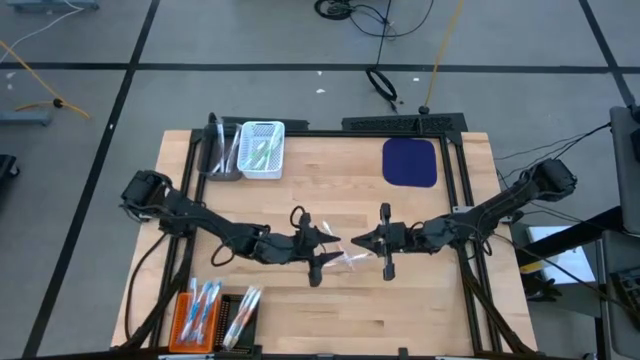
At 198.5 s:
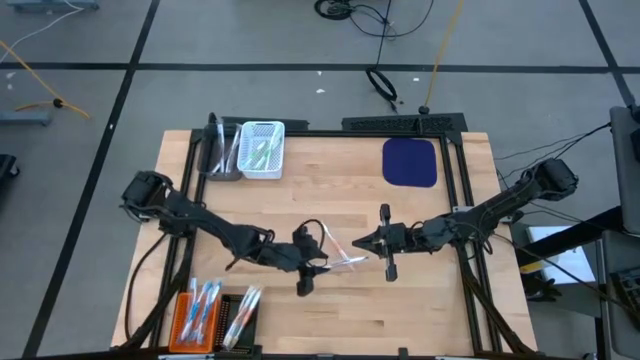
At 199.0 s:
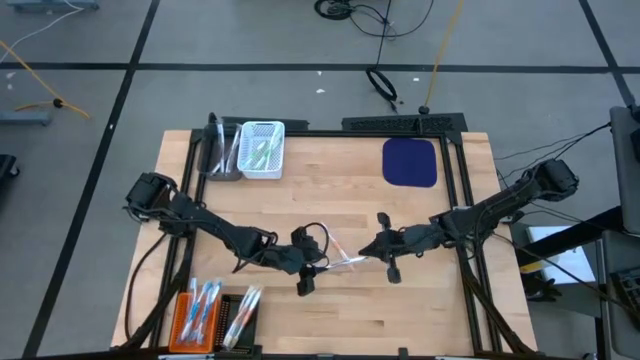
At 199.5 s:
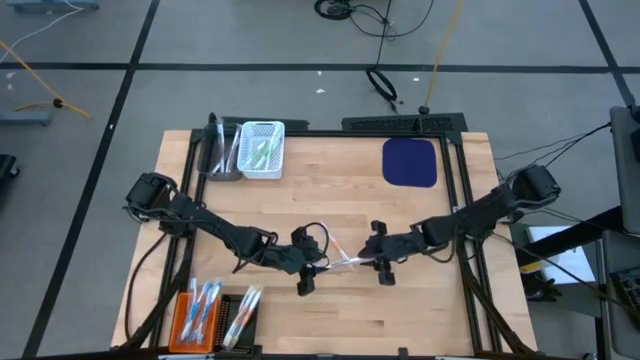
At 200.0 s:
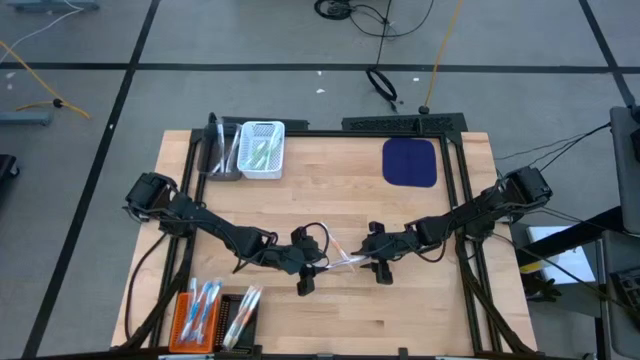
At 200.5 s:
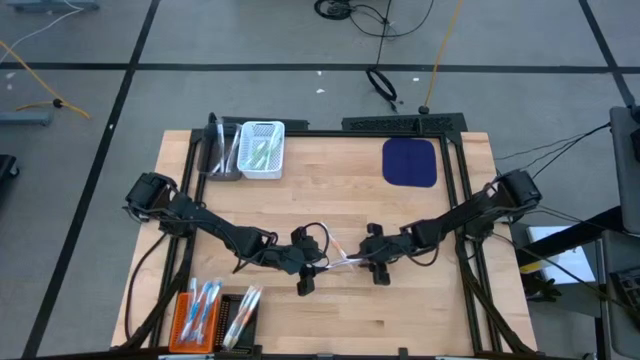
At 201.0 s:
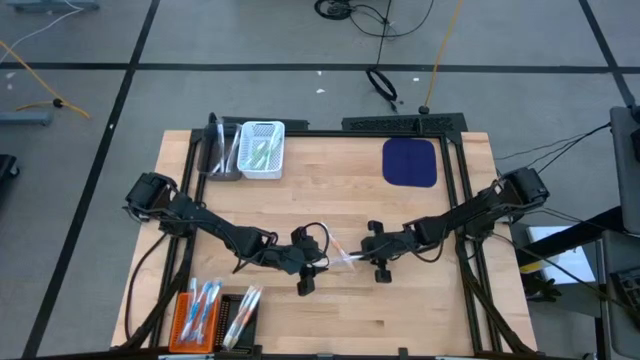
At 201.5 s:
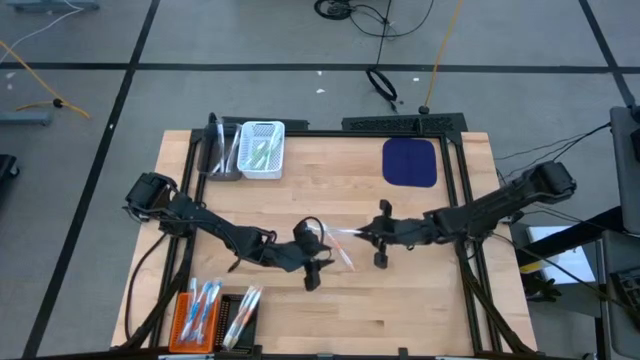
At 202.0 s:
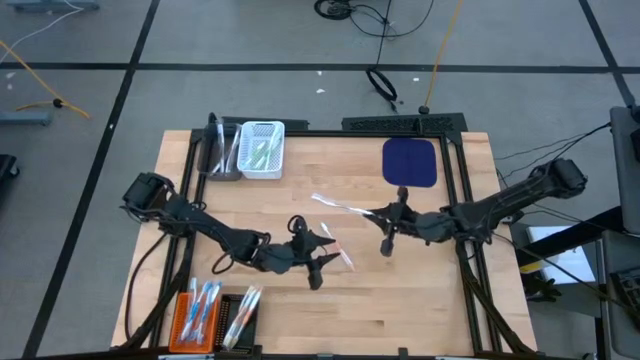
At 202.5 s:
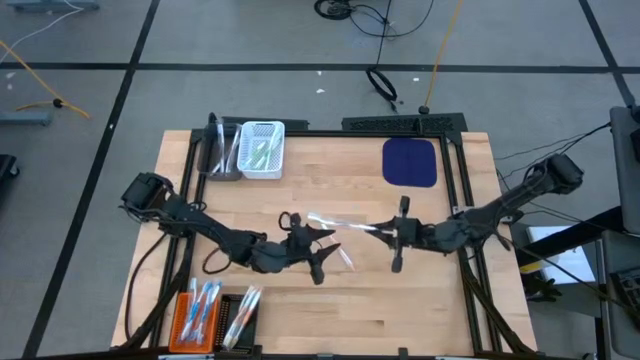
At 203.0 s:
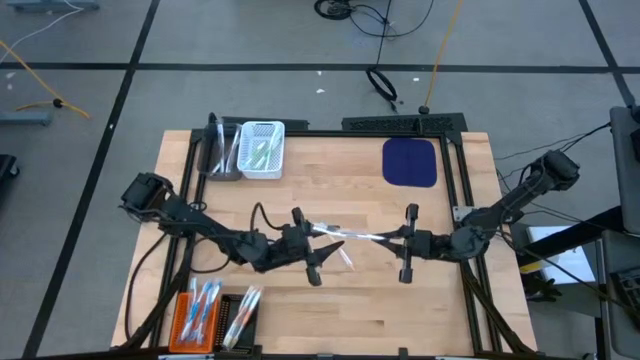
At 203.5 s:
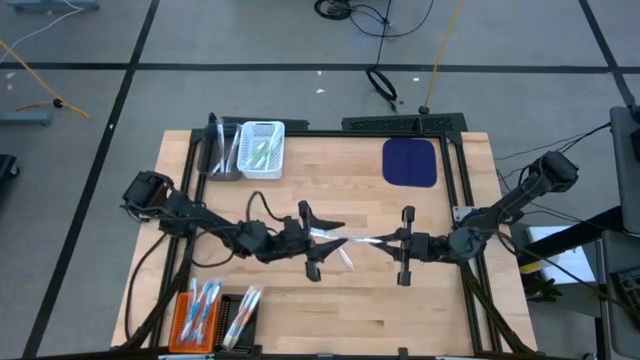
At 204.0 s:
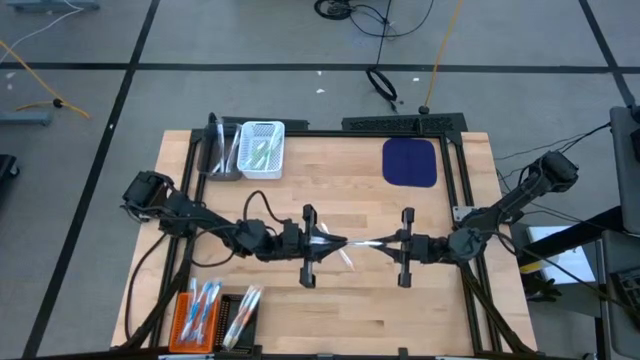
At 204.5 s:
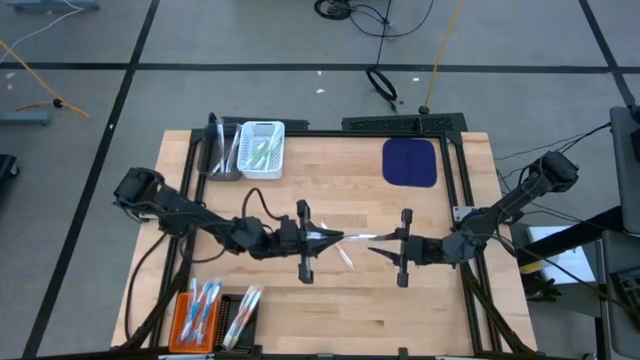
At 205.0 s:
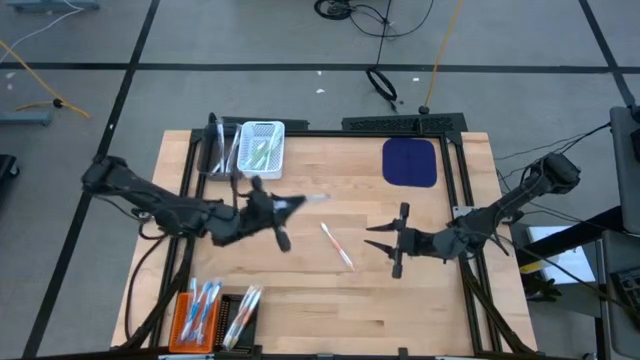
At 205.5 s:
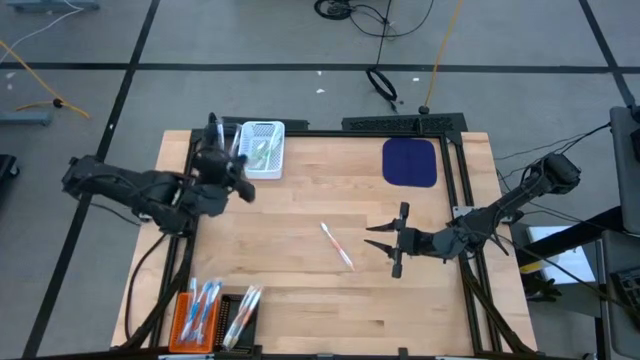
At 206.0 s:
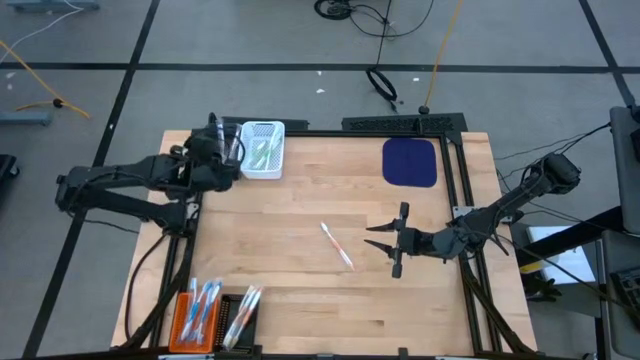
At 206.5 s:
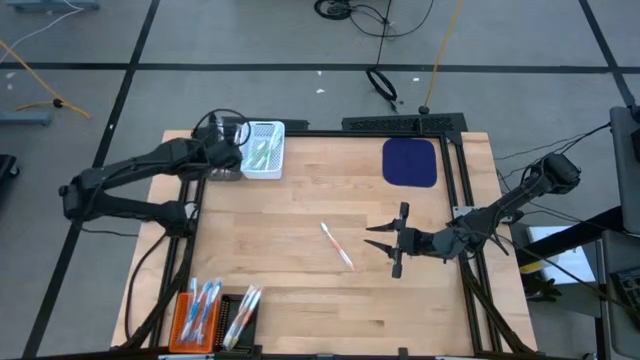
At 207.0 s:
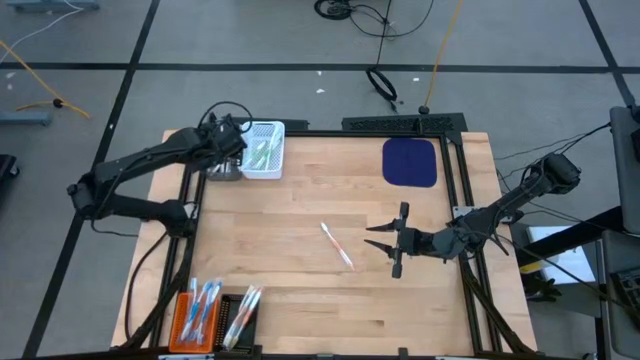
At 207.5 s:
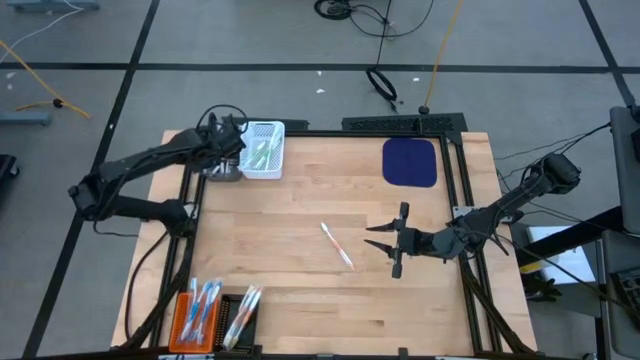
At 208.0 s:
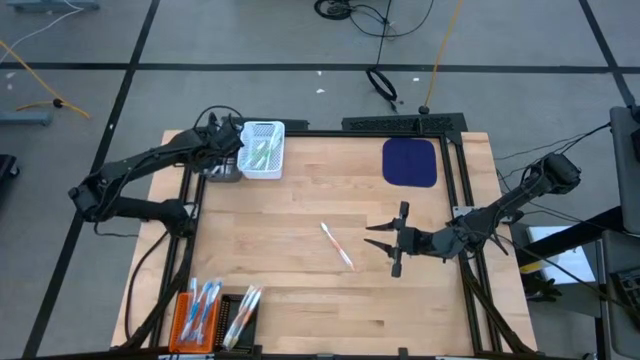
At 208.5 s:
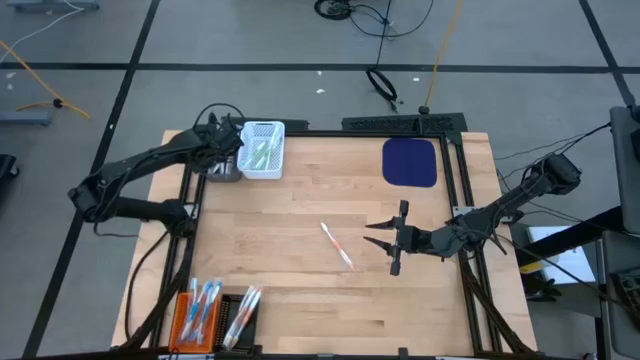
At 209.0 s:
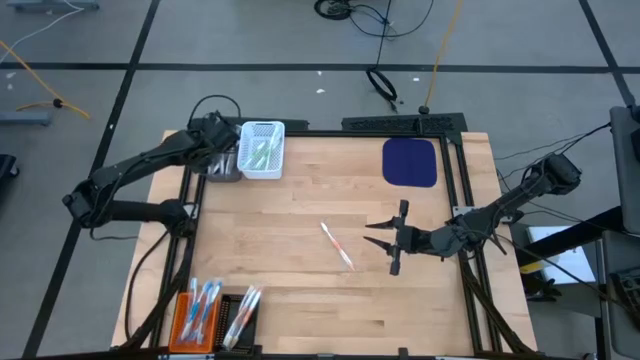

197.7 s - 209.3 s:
Task: Pick & Place Toothbrushes
Put the violet toothbrush into the gray bin

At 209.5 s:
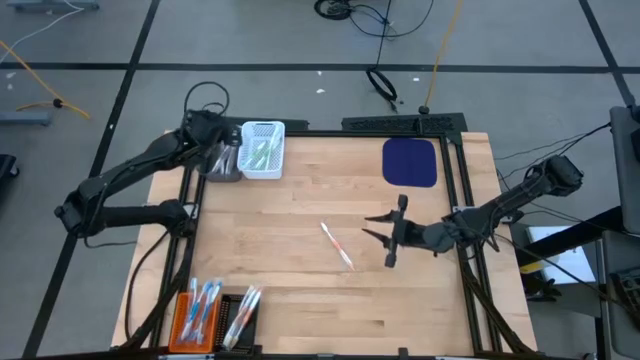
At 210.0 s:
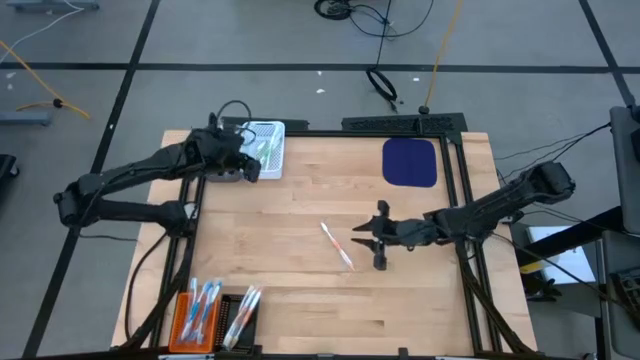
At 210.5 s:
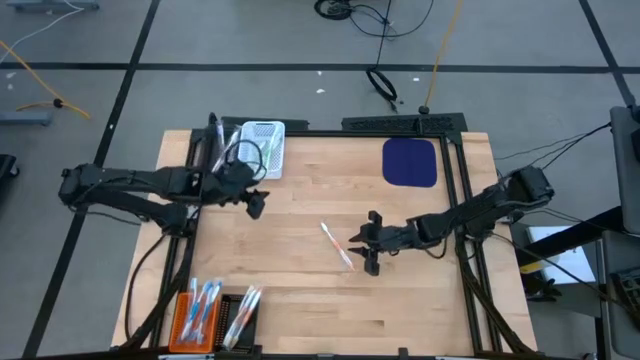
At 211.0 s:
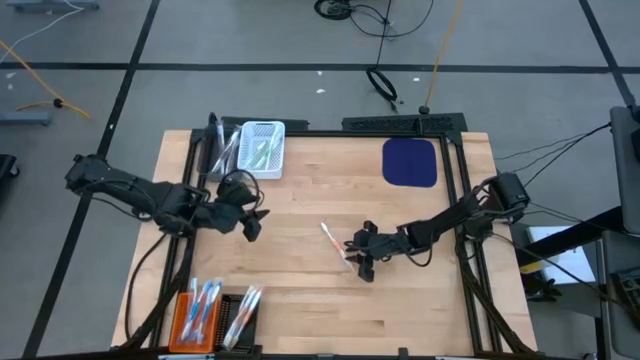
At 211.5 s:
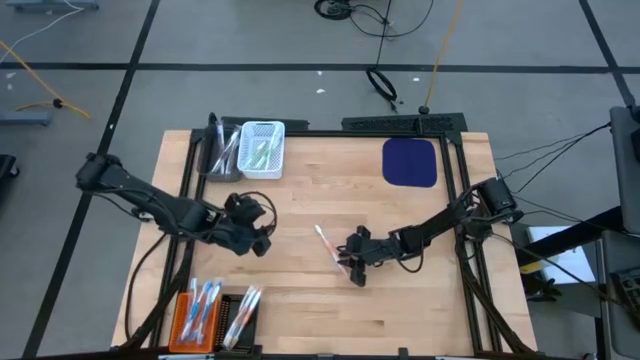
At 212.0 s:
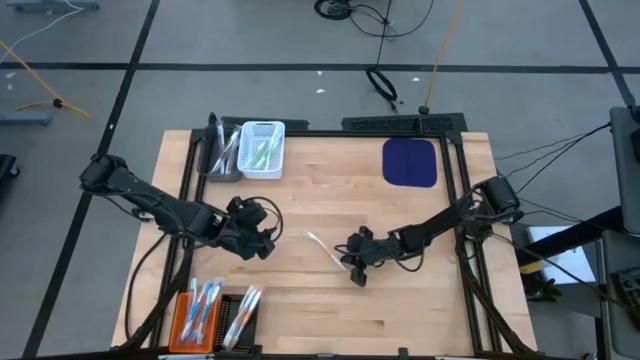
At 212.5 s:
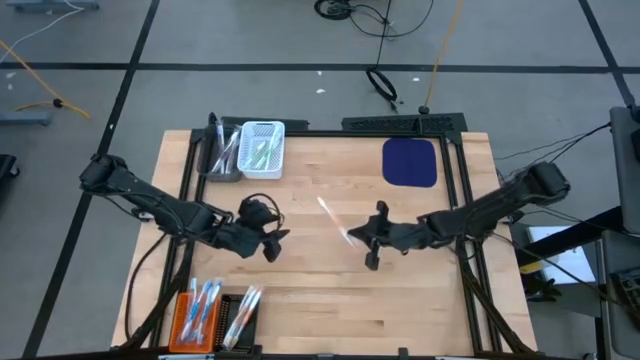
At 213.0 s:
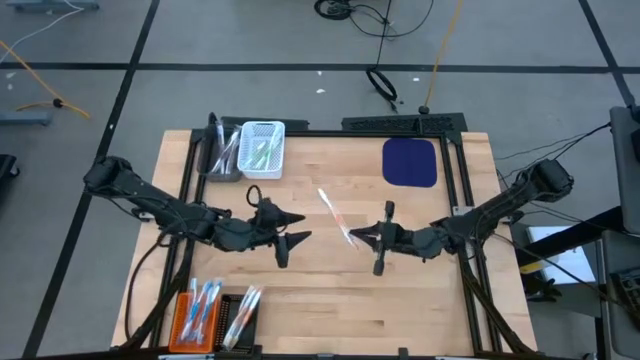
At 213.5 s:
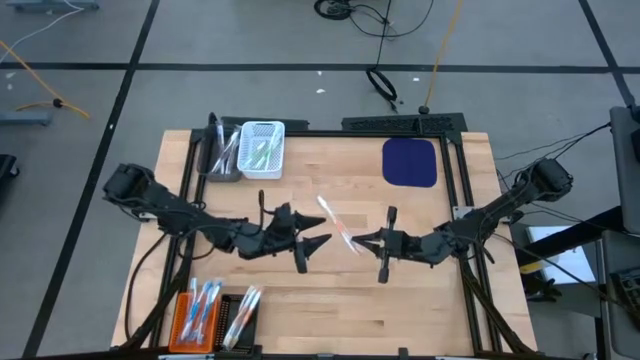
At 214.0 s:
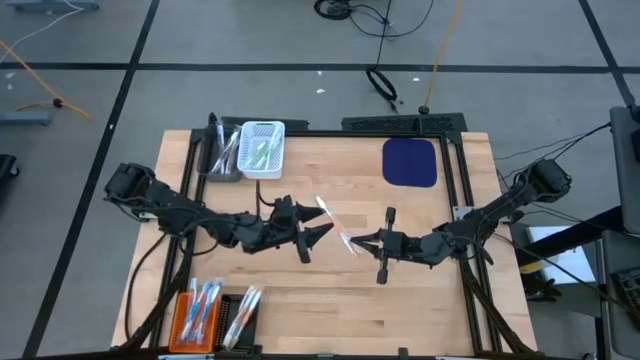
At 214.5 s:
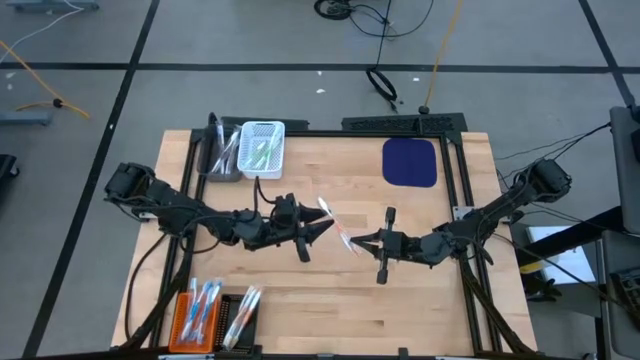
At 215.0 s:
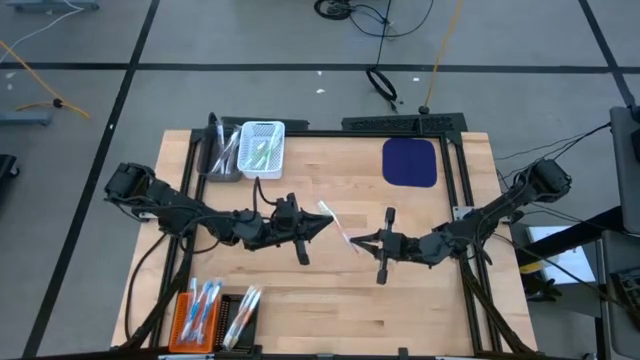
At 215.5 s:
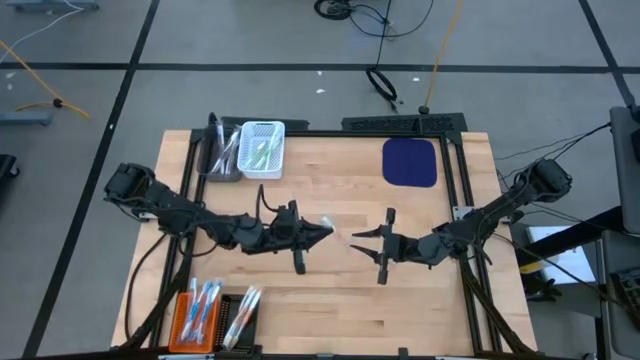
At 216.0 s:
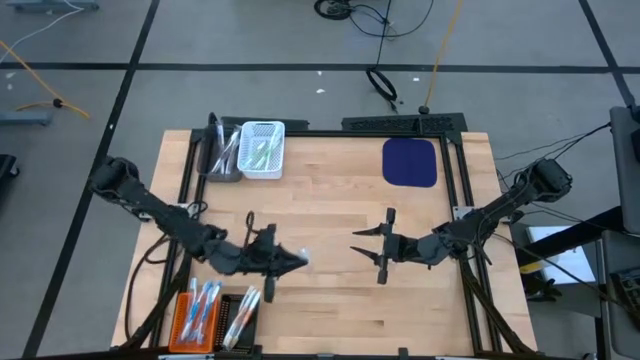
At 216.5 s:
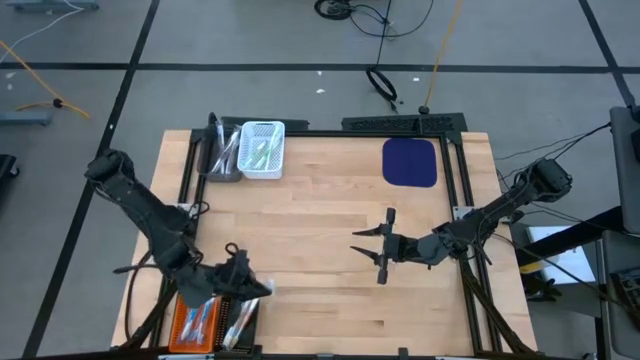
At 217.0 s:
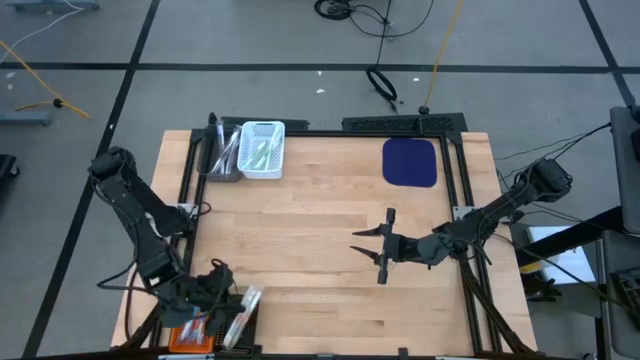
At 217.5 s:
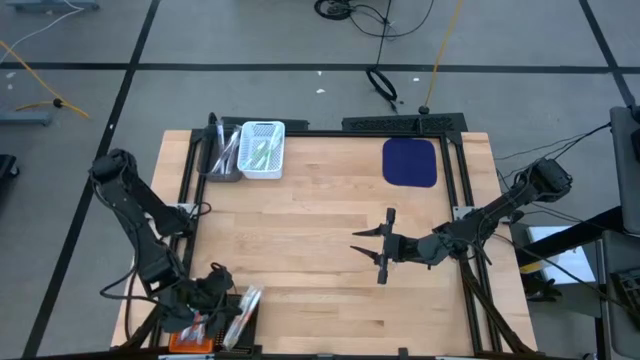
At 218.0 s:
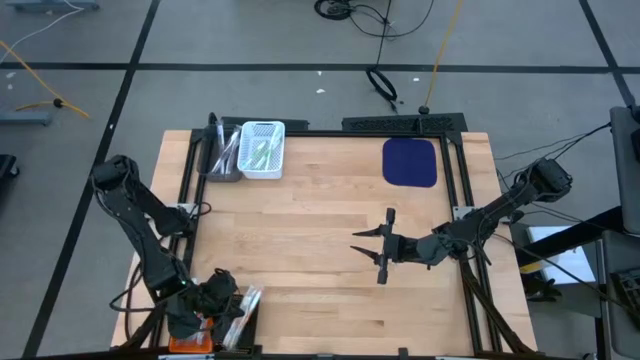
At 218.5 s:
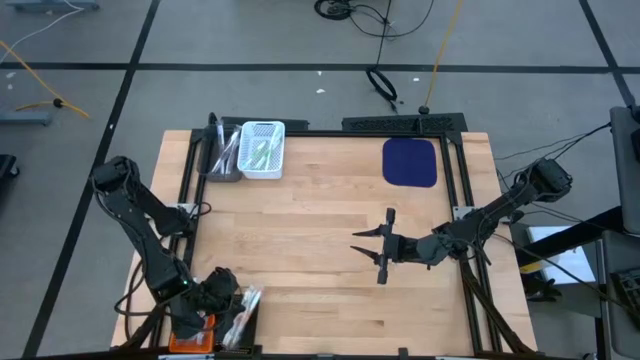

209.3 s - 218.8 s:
Put the orange toothbrush into the black bin
